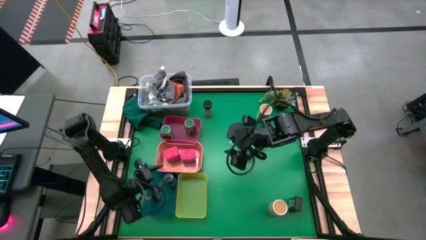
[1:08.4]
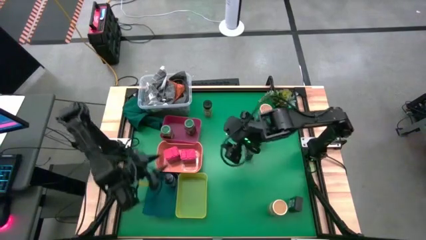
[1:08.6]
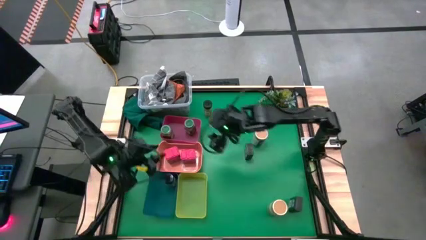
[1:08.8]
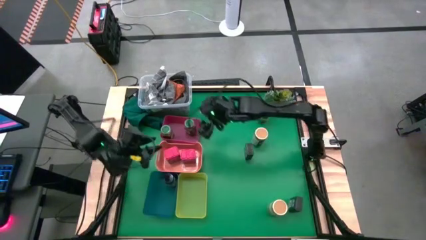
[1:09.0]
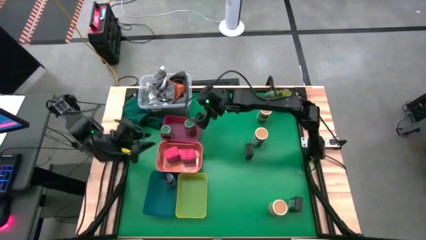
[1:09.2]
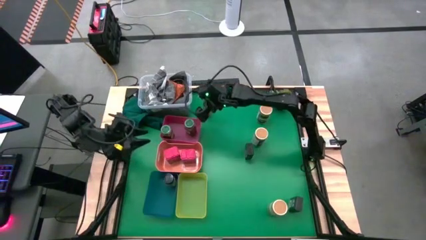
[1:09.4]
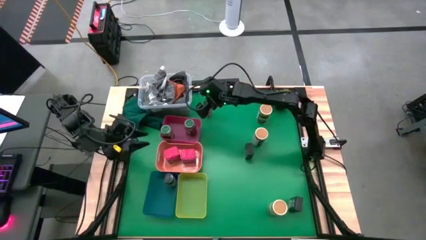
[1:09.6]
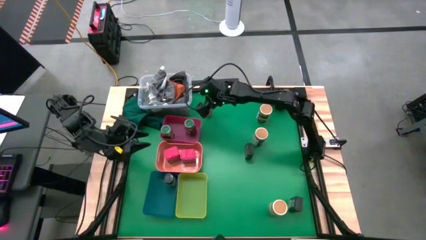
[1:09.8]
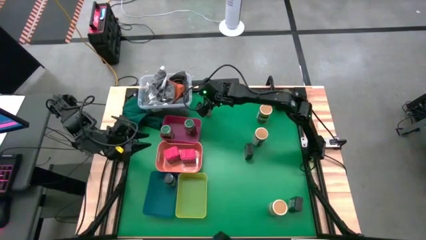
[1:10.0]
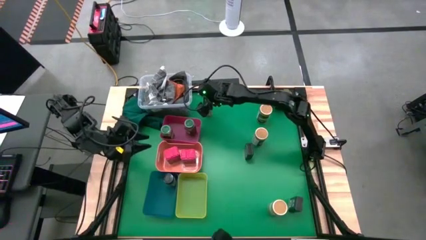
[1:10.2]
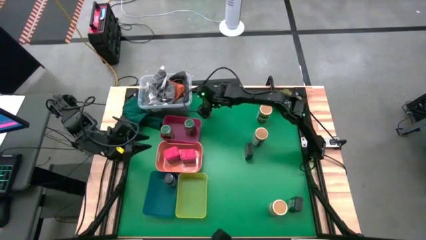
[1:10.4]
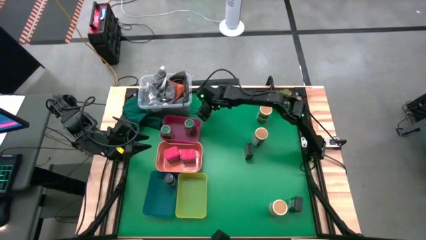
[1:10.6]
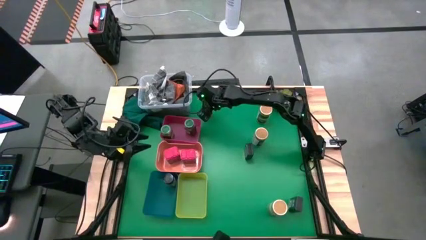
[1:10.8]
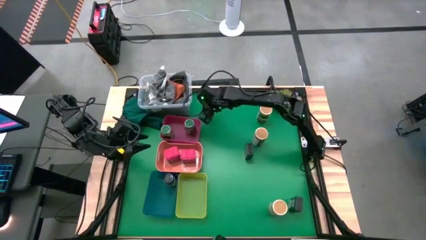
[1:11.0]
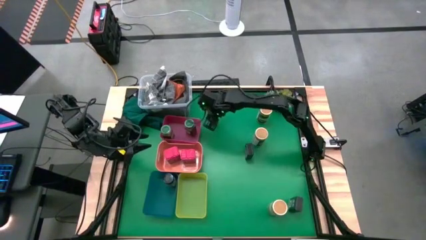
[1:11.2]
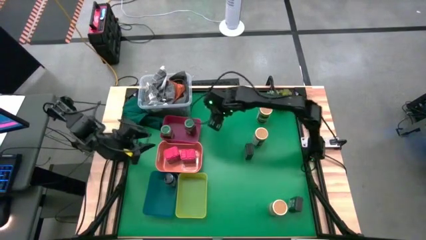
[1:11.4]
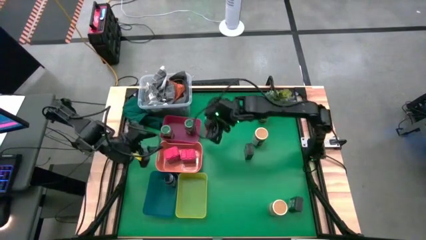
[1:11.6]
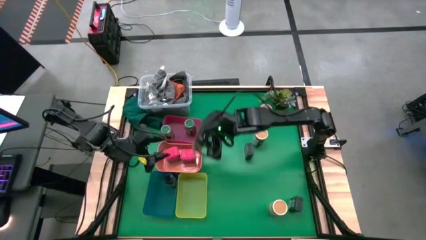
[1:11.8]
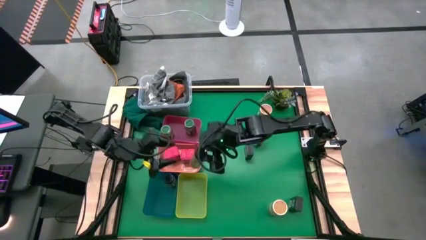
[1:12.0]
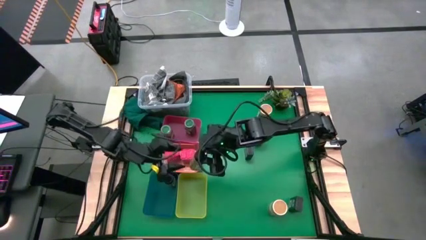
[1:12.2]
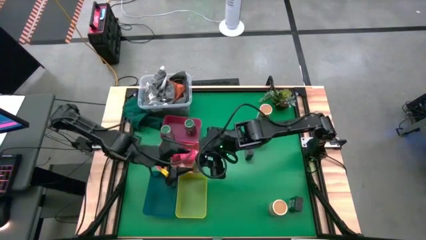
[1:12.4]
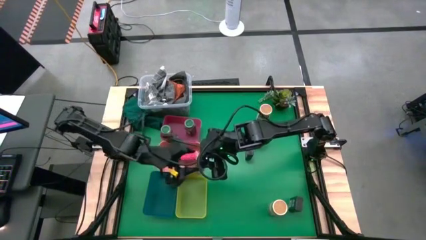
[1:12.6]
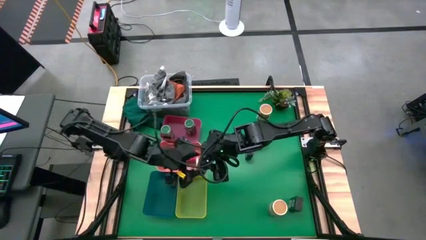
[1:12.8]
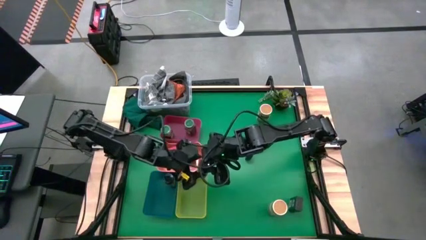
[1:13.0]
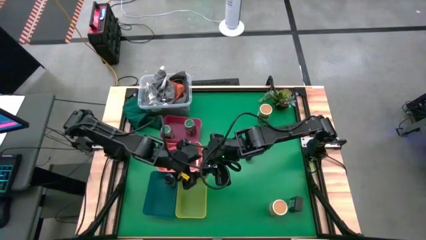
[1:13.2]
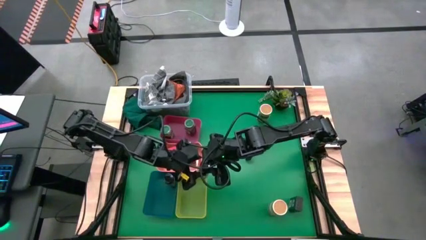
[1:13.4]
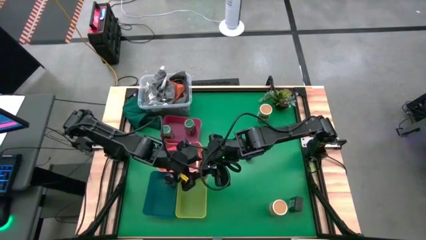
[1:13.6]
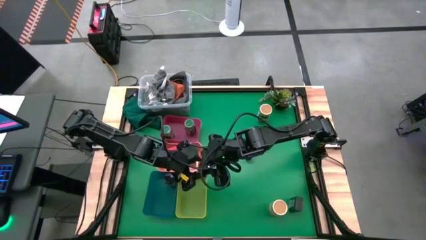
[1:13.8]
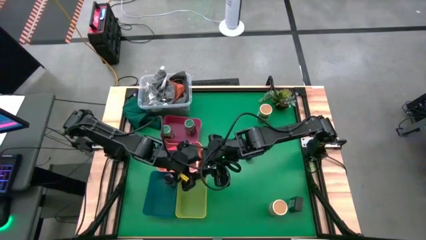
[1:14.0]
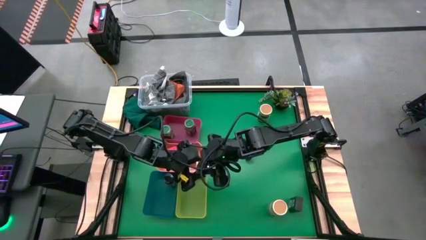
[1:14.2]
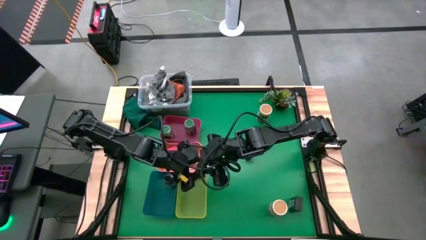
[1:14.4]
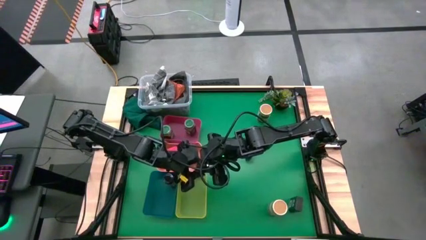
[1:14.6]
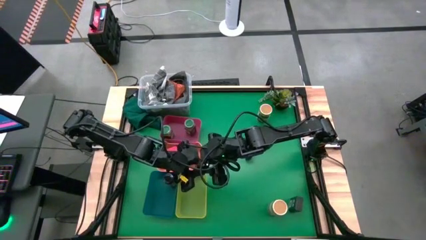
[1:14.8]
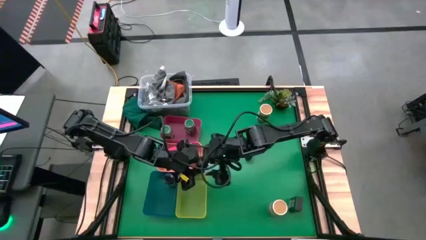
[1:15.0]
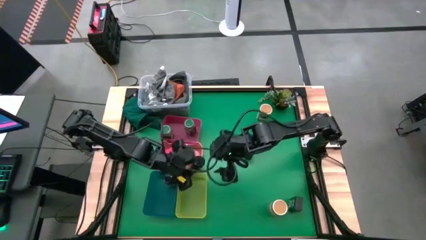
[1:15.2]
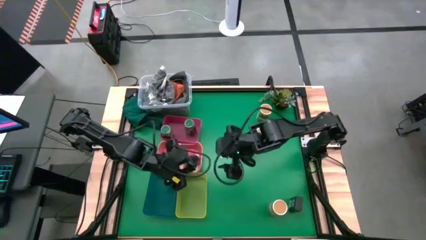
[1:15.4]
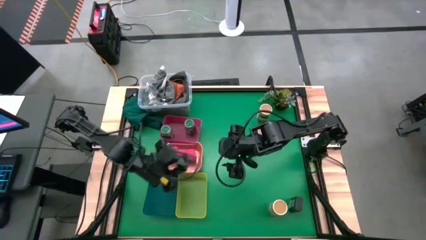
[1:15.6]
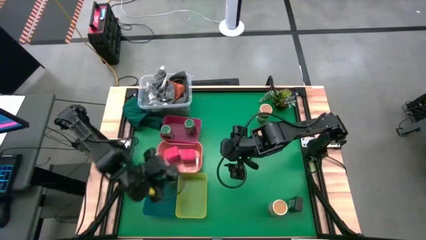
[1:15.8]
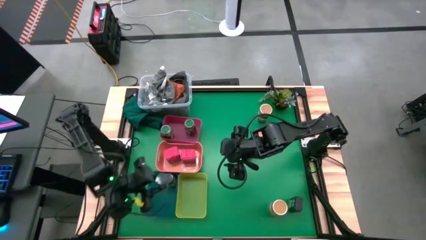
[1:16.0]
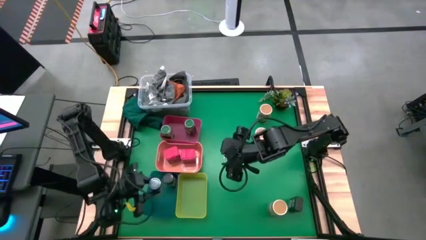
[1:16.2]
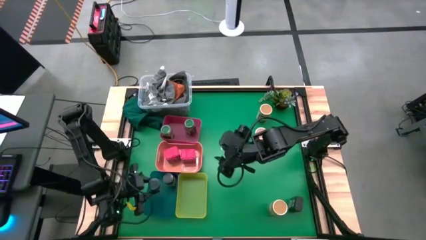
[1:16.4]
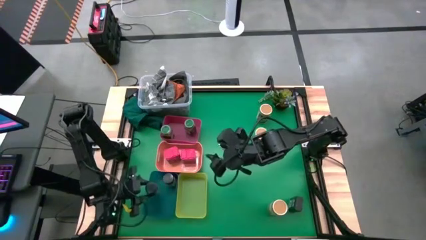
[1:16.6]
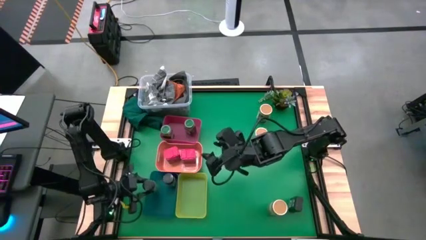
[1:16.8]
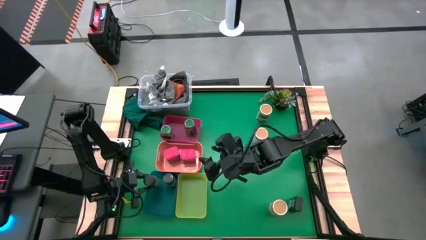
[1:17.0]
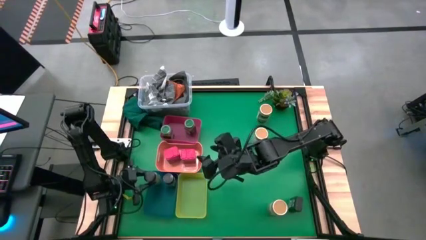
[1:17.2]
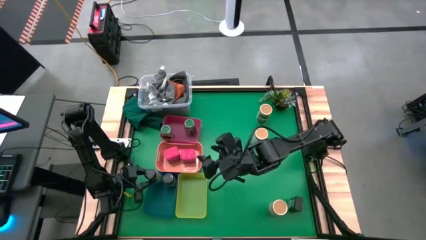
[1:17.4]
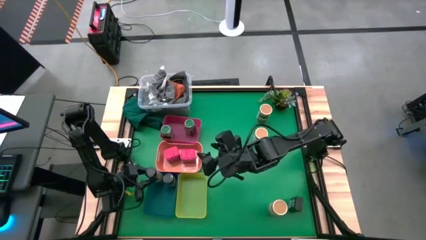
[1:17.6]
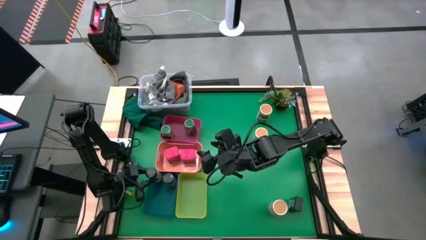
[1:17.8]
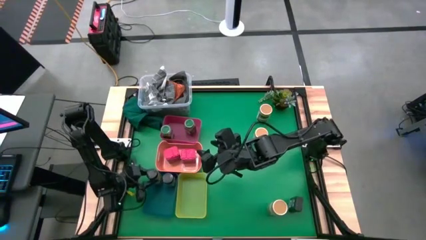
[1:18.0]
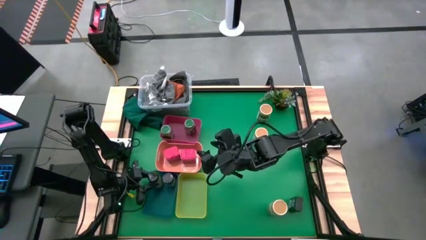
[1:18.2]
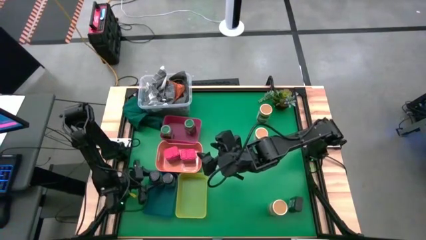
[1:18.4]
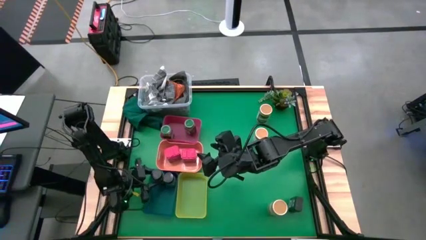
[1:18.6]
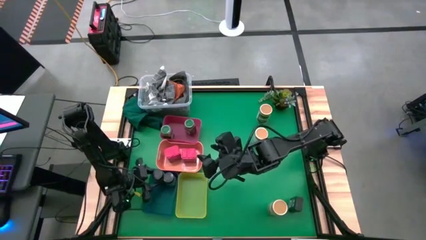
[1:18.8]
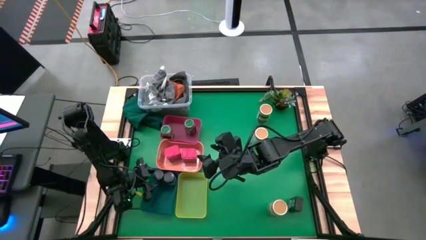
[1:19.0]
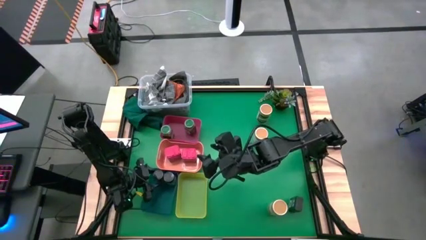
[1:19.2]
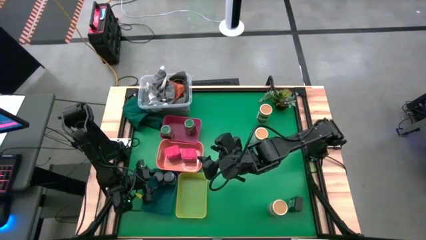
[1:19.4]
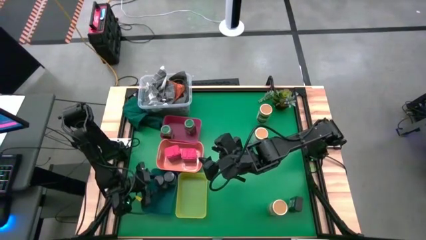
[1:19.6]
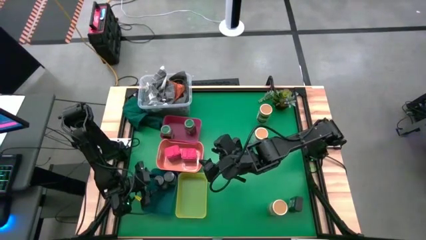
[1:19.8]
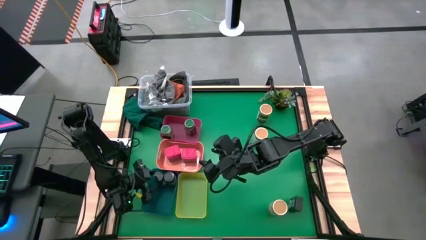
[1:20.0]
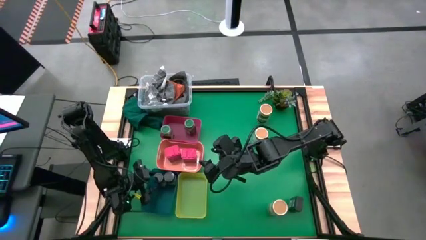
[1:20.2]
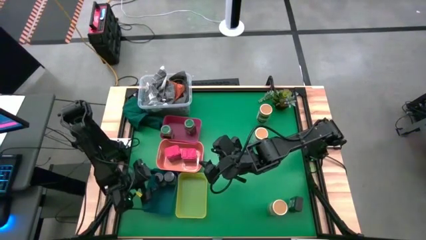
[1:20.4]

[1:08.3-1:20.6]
Task: Sort spices by type
Put the black seasoning bottle into the blue bin

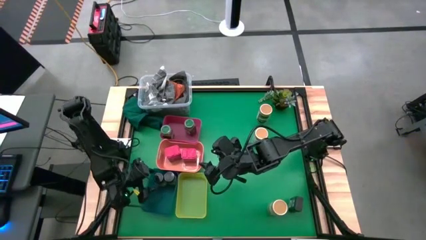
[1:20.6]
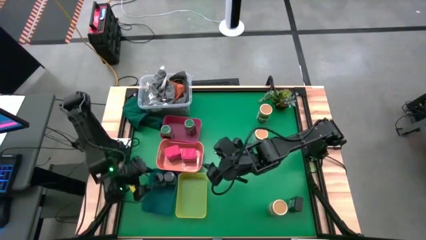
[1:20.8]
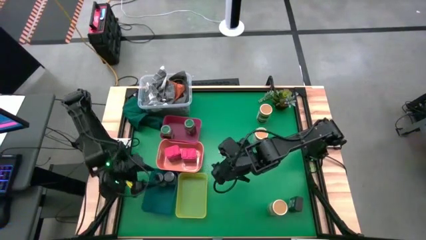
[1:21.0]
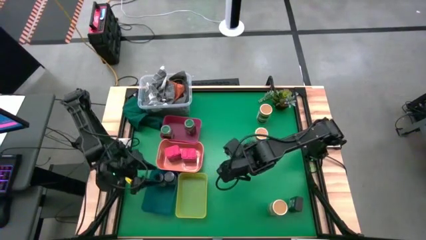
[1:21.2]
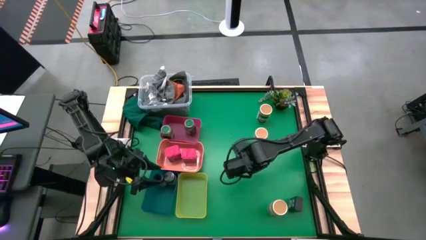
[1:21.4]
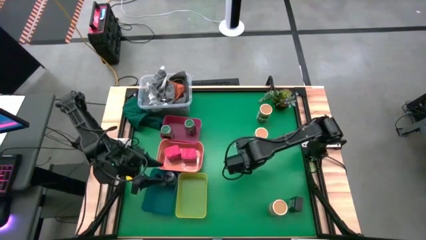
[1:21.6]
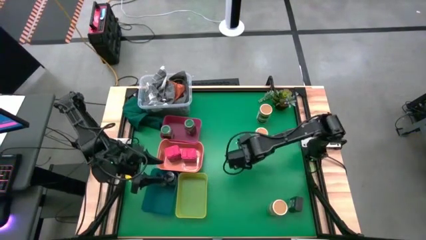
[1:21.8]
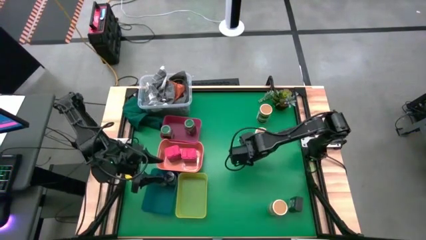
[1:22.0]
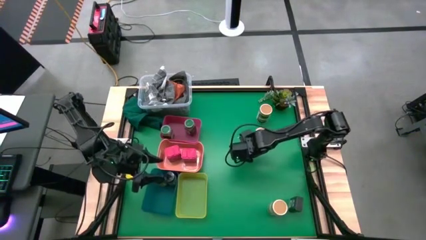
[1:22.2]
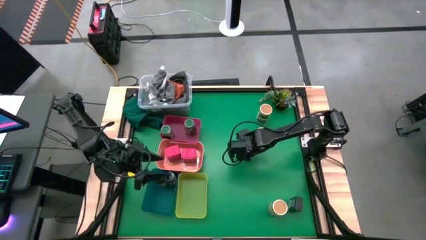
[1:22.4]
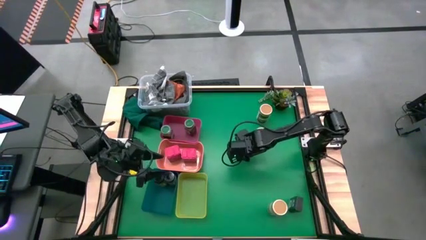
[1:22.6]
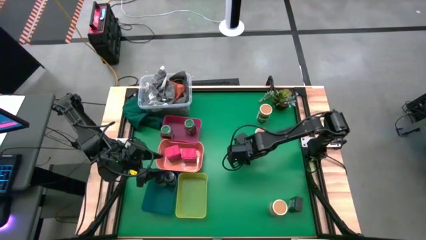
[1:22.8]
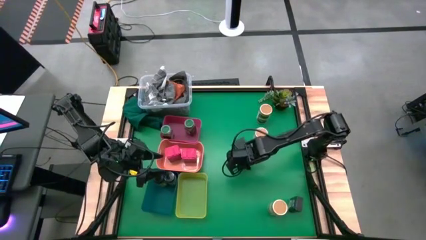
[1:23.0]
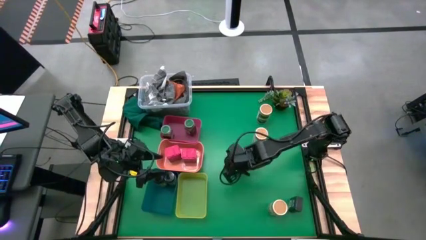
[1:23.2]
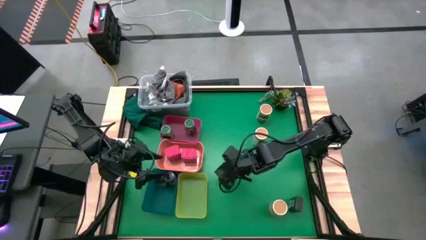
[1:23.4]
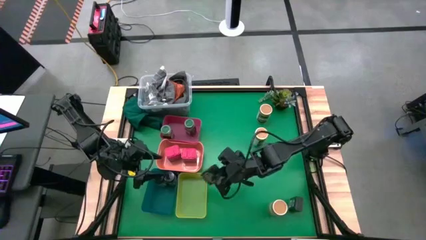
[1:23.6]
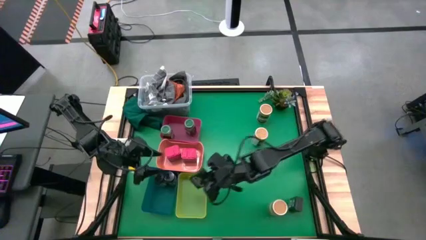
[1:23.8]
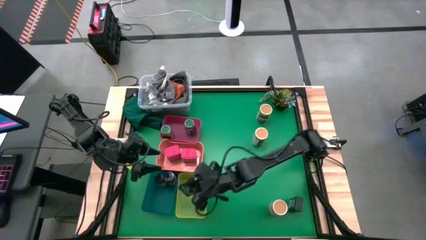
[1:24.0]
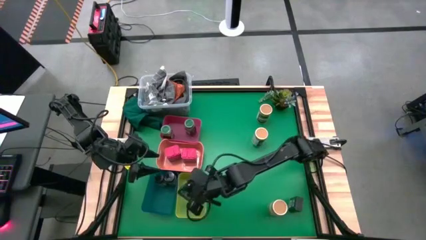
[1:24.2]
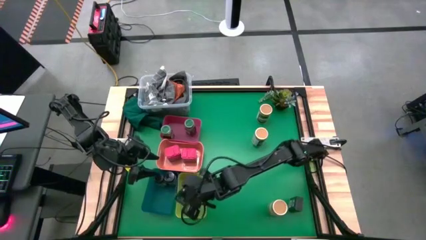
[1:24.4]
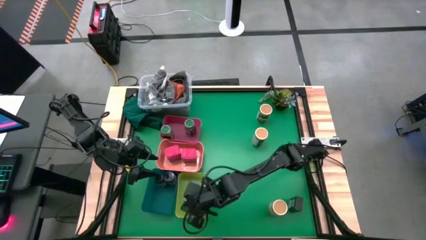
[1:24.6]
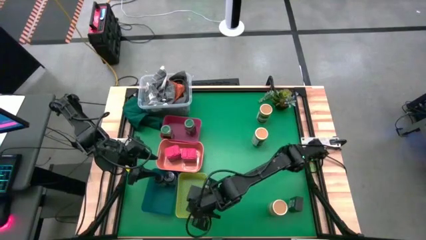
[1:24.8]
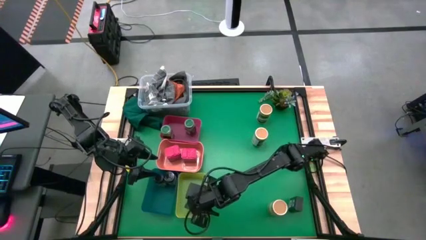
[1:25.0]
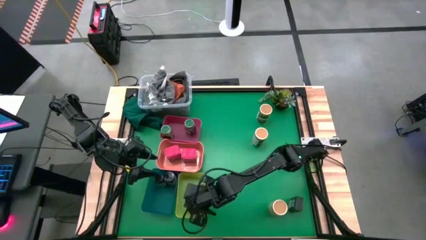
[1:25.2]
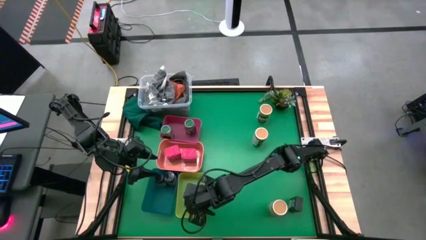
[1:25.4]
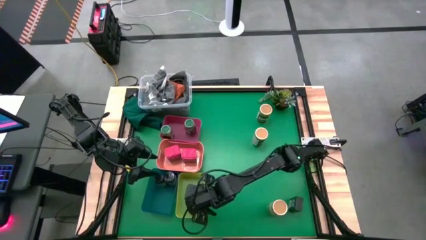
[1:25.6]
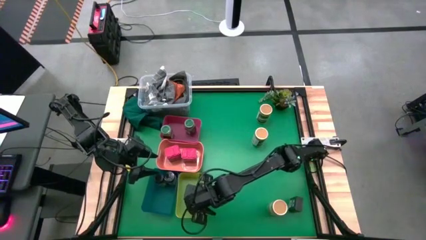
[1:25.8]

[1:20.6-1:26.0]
Put the top black seasoning can into the orange bin
